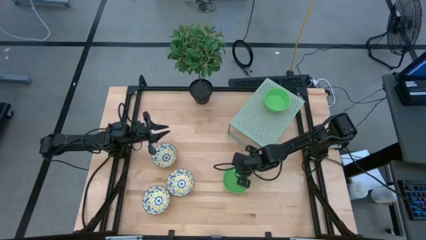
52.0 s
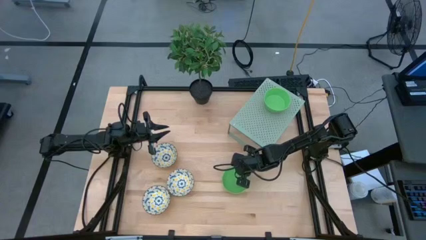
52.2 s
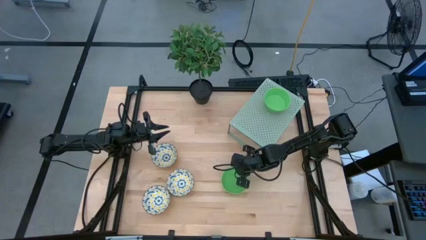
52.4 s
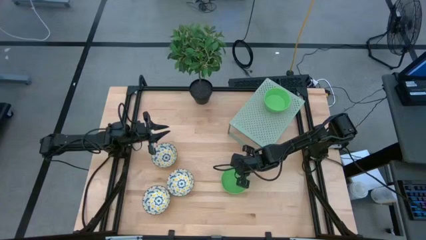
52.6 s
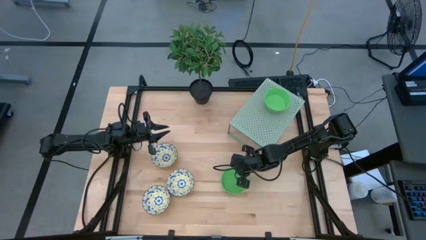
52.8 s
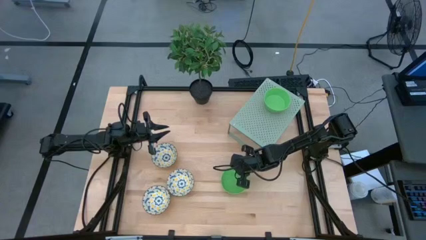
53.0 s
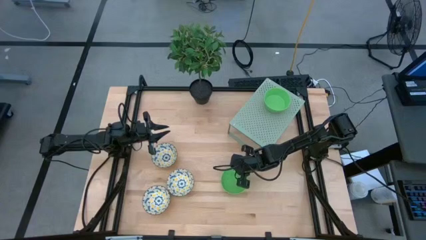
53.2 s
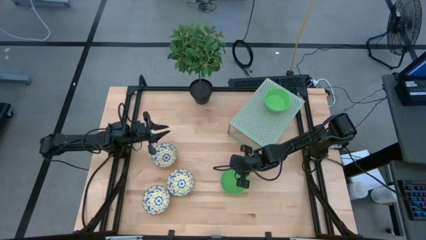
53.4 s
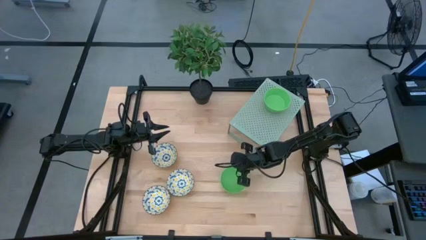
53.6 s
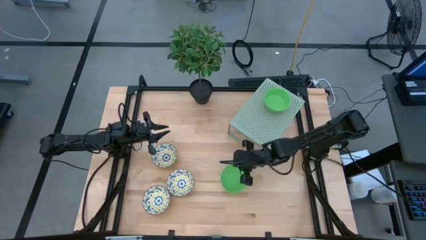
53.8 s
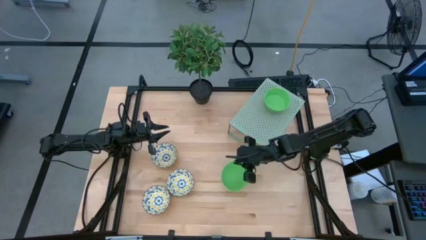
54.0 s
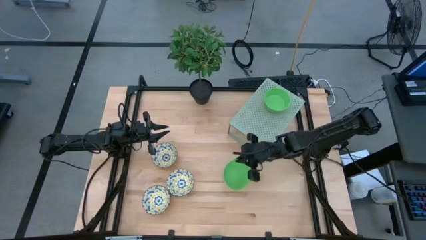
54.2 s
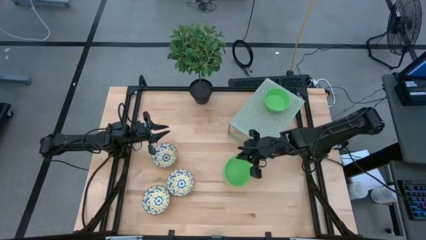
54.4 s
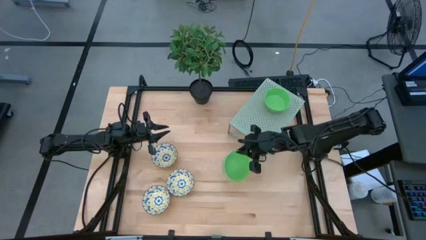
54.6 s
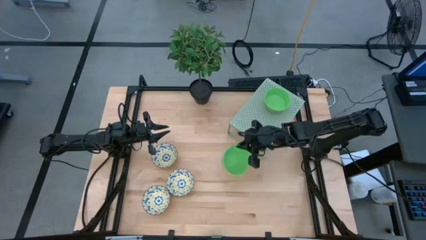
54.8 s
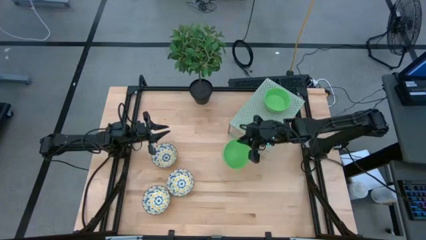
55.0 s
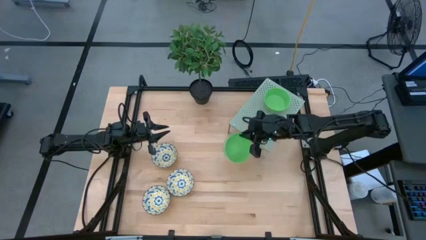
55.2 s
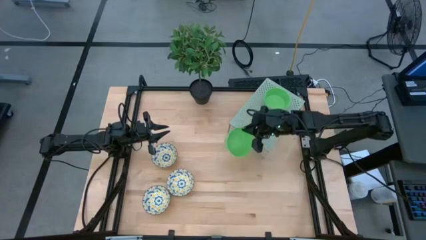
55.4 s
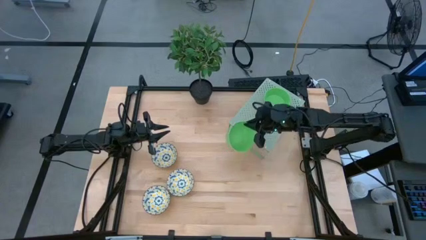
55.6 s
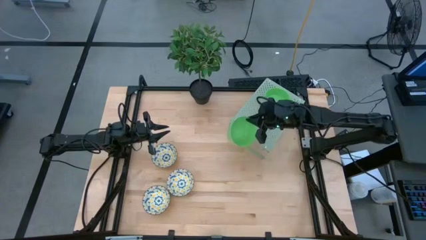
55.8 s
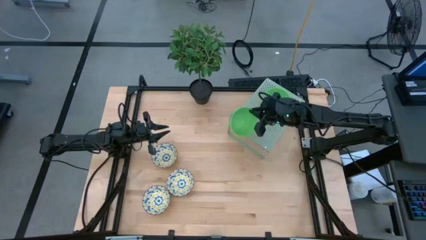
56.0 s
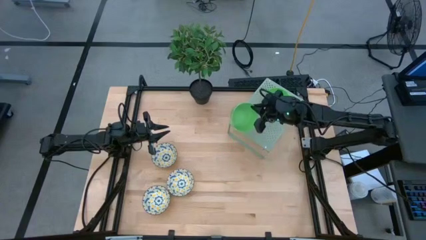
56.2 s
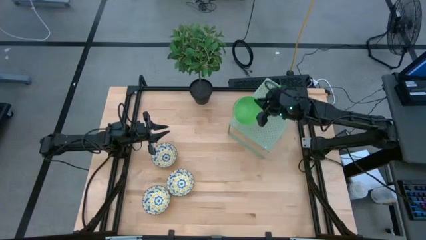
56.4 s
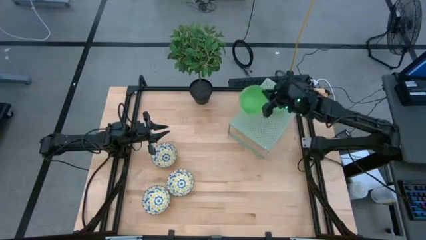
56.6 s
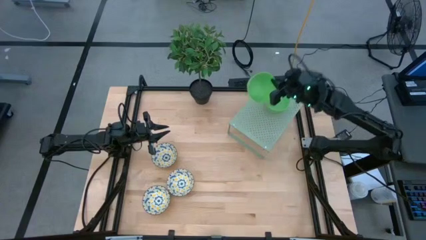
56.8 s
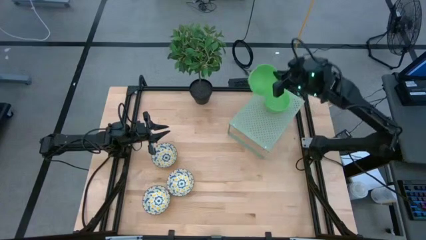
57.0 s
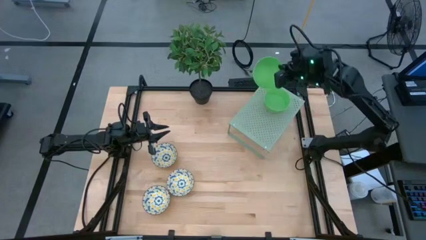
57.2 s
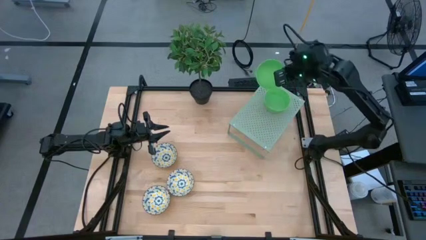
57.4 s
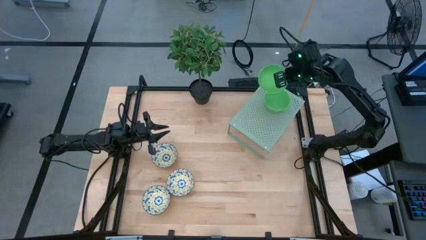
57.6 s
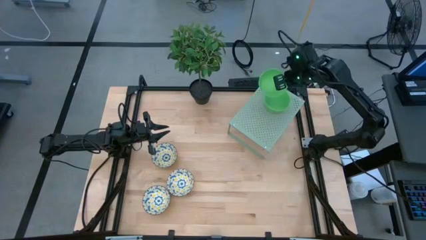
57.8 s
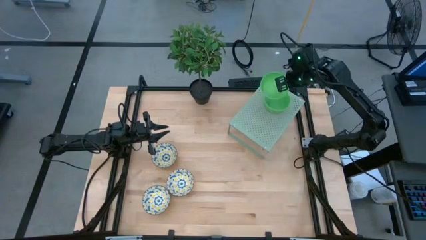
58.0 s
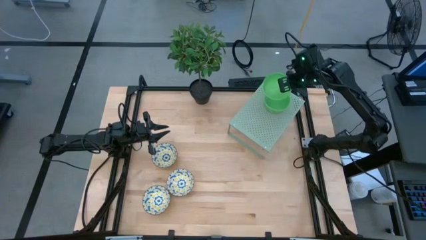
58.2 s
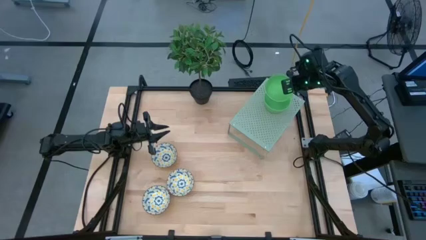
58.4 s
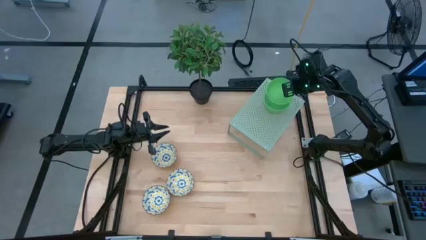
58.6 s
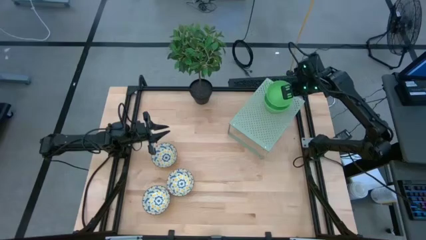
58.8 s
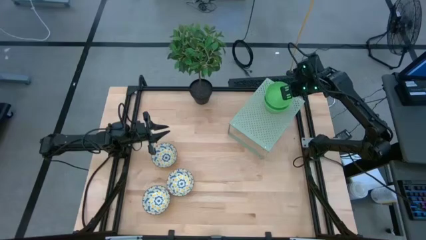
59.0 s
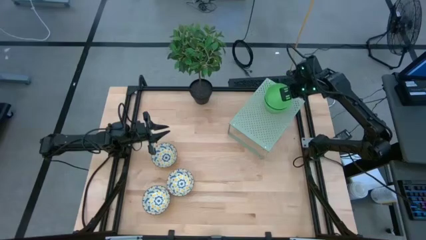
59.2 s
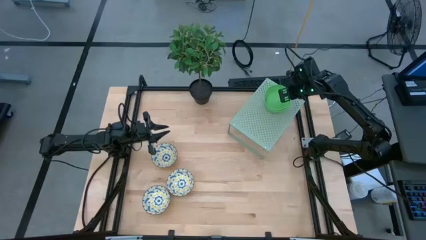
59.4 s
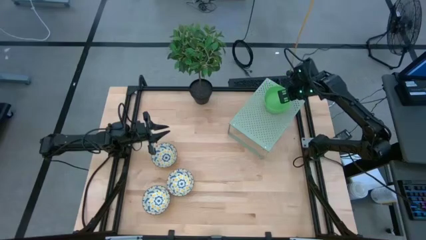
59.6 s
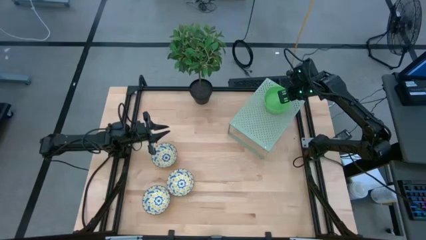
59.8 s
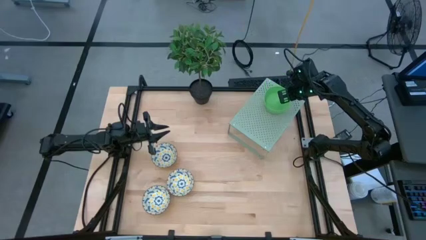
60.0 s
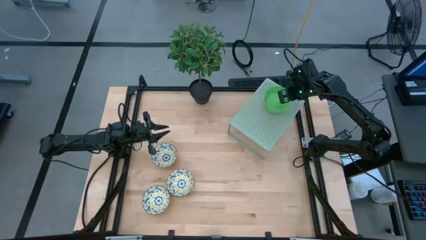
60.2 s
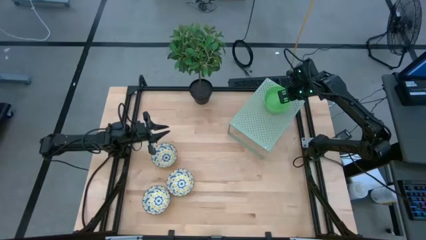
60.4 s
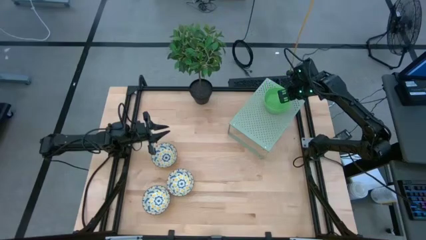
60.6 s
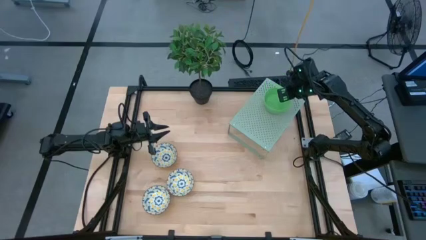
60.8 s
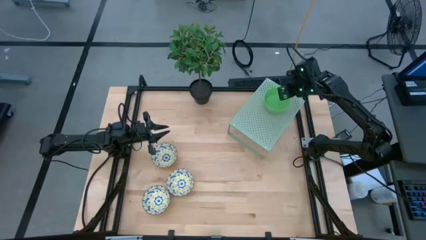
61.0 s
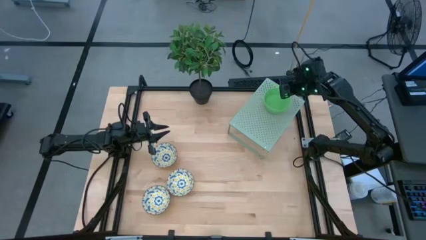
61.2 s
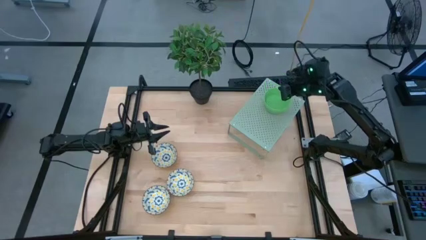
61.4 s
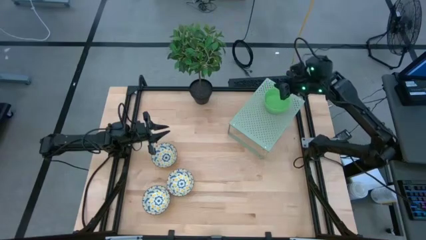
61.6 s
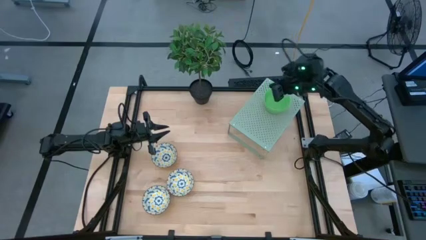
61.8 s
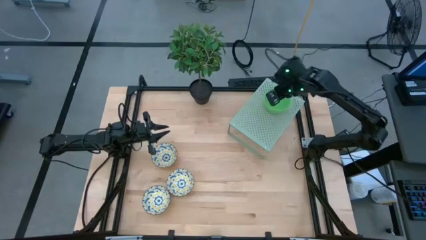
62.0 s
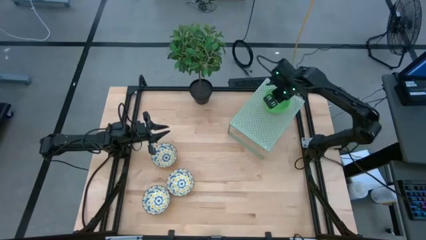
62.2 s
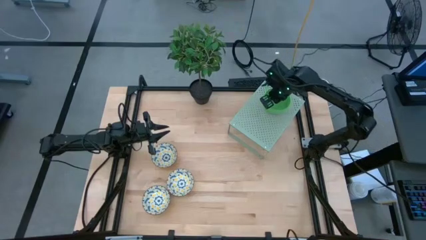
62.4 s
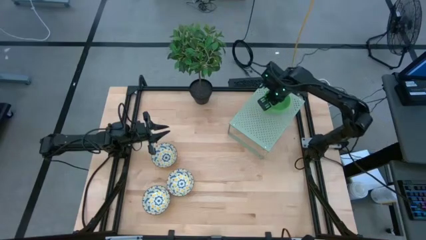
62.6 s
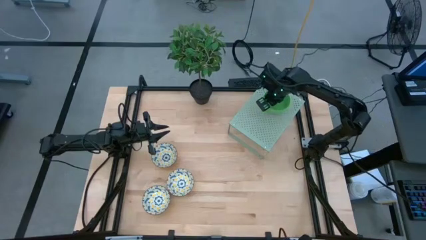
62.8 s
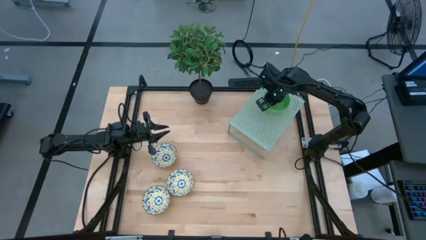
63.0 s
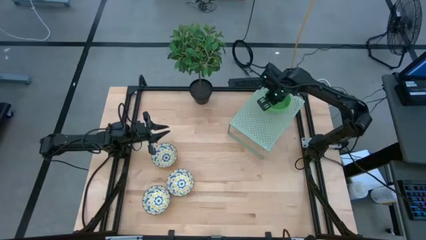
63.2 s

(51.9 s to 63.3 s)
Task: Pick & Place Mini bowls
Stack the green bowl on the green bowls on the shelf
